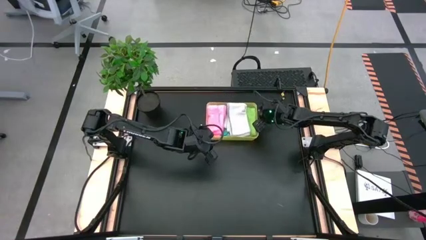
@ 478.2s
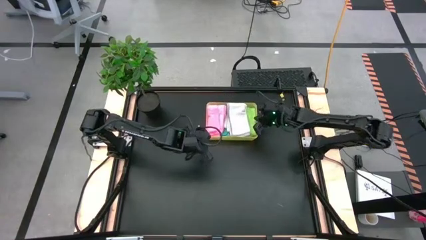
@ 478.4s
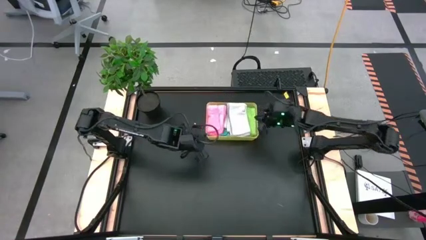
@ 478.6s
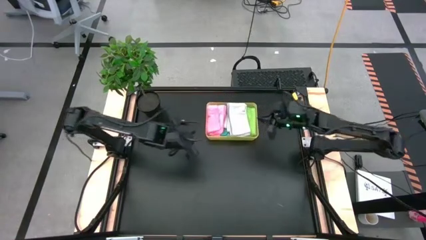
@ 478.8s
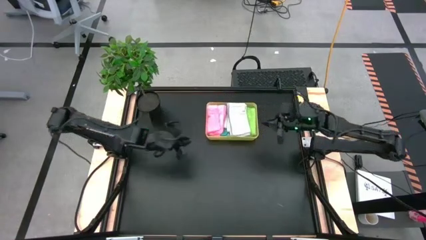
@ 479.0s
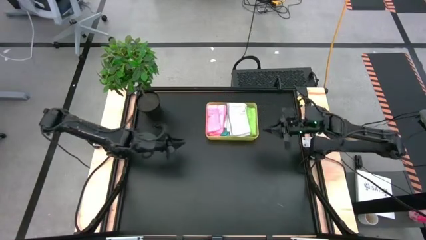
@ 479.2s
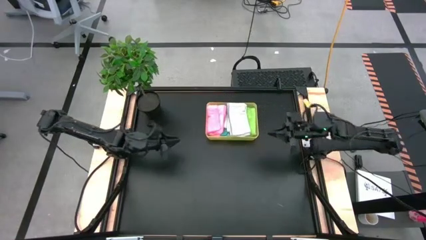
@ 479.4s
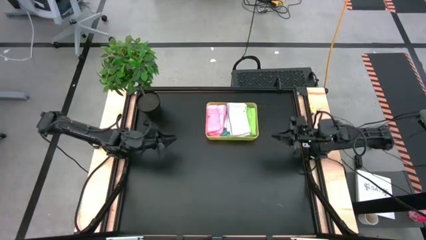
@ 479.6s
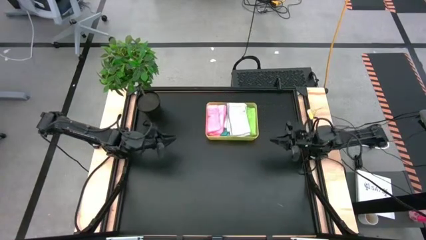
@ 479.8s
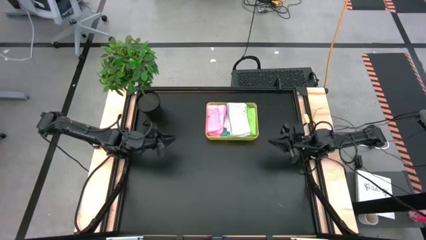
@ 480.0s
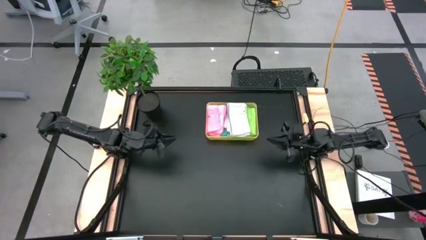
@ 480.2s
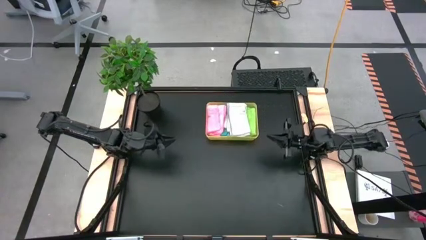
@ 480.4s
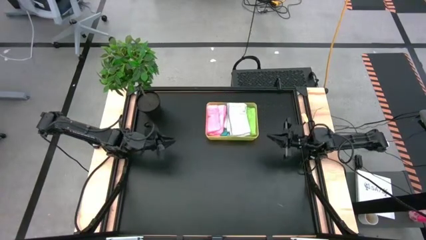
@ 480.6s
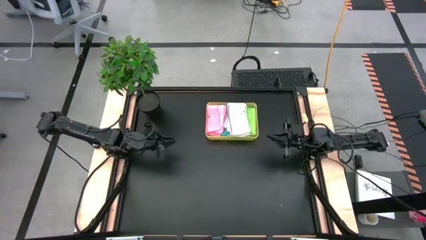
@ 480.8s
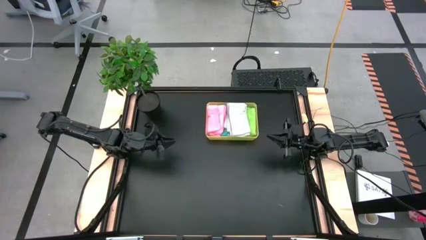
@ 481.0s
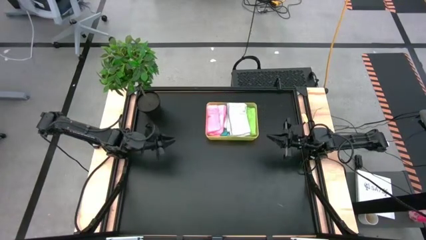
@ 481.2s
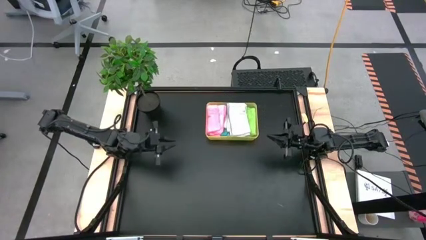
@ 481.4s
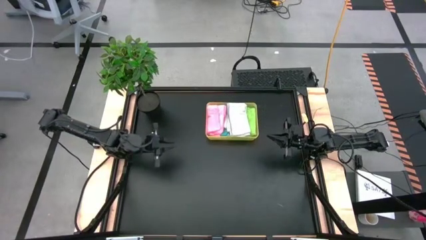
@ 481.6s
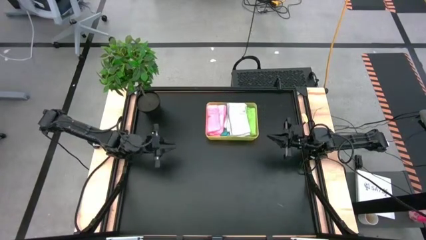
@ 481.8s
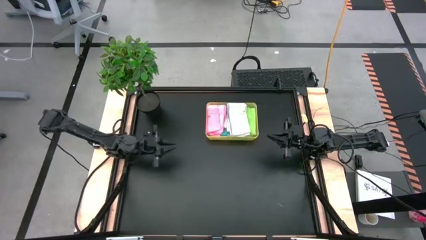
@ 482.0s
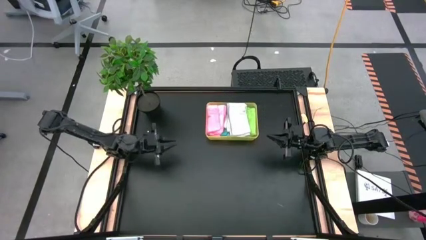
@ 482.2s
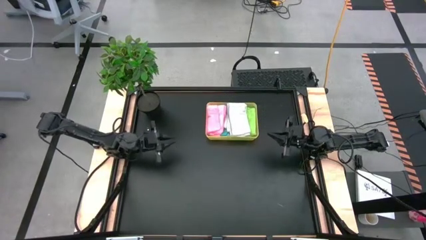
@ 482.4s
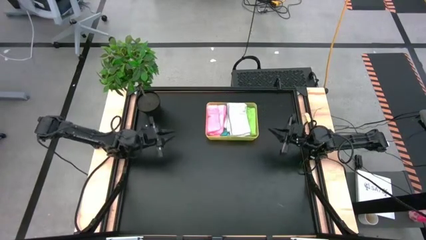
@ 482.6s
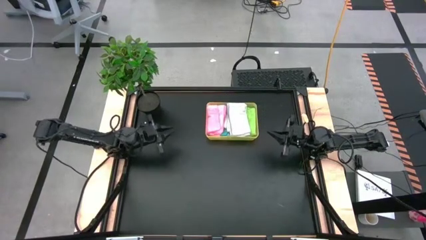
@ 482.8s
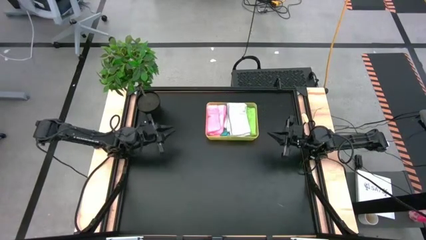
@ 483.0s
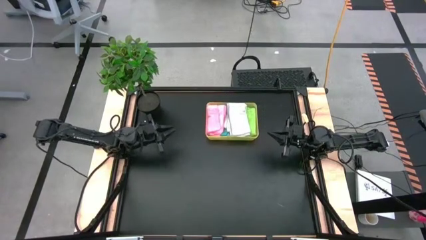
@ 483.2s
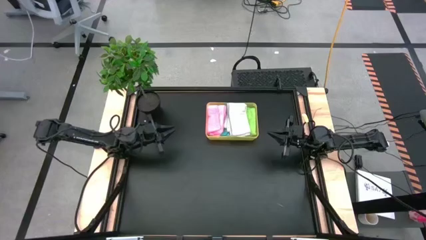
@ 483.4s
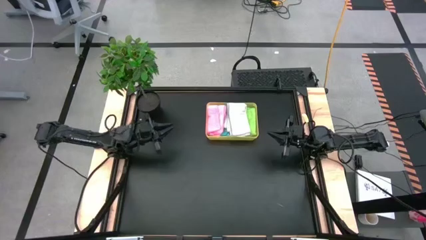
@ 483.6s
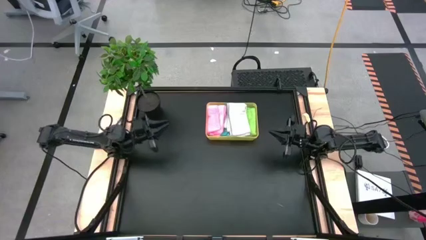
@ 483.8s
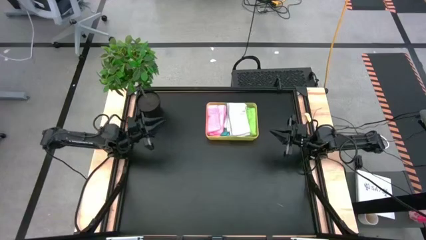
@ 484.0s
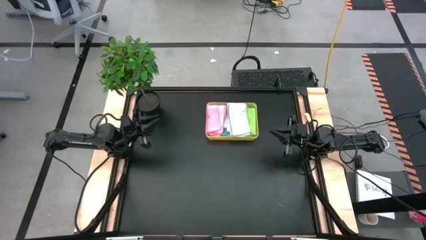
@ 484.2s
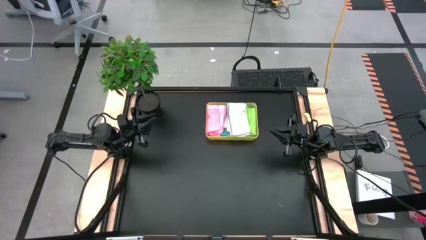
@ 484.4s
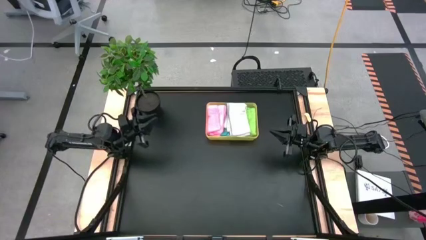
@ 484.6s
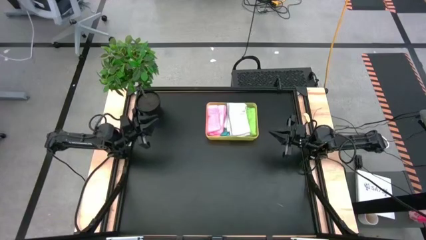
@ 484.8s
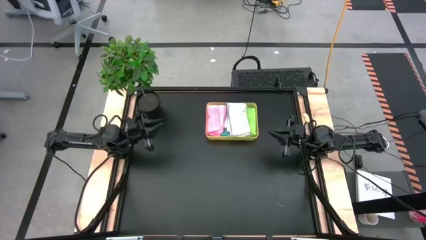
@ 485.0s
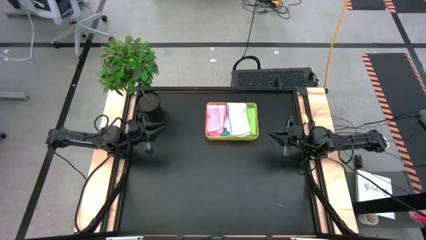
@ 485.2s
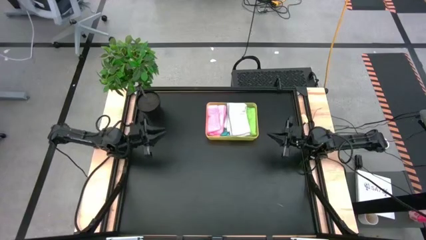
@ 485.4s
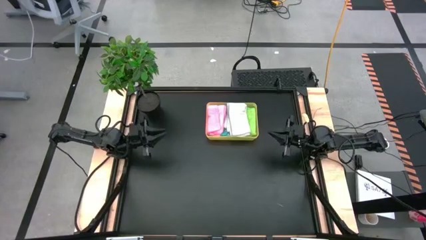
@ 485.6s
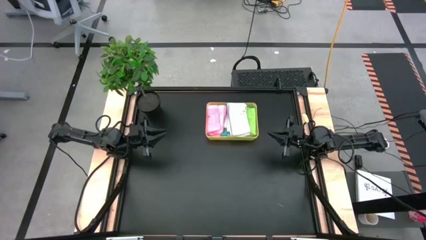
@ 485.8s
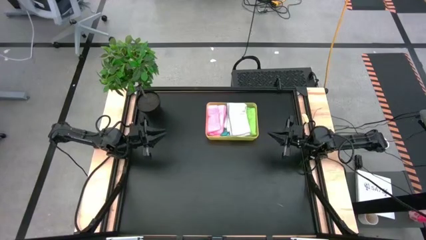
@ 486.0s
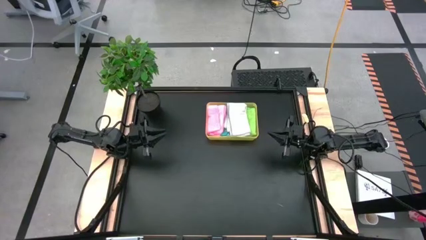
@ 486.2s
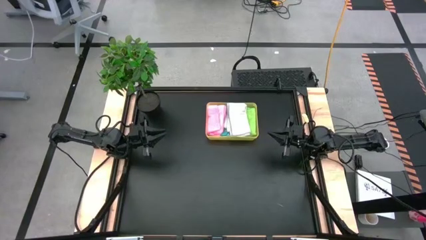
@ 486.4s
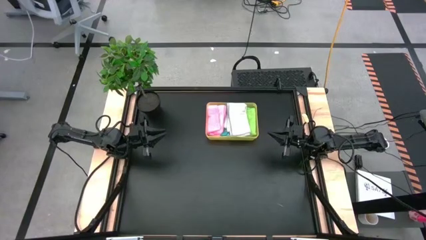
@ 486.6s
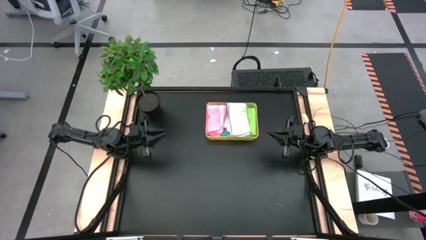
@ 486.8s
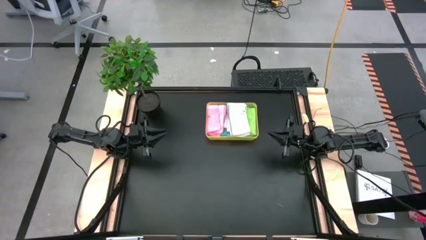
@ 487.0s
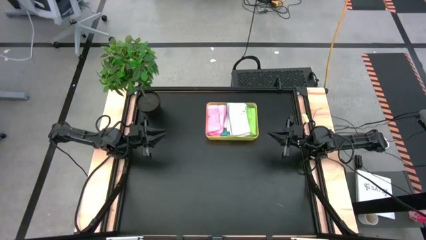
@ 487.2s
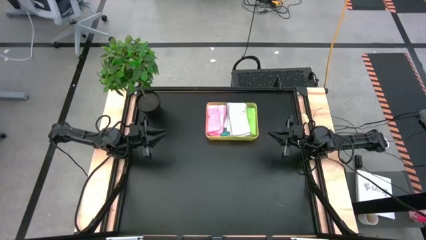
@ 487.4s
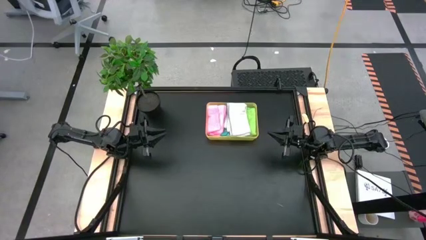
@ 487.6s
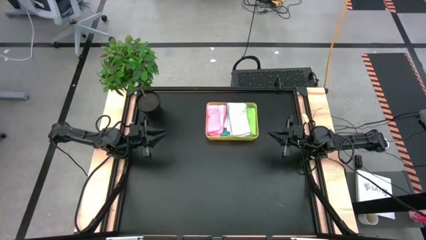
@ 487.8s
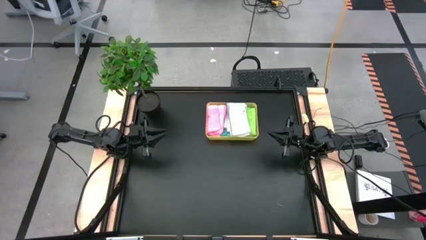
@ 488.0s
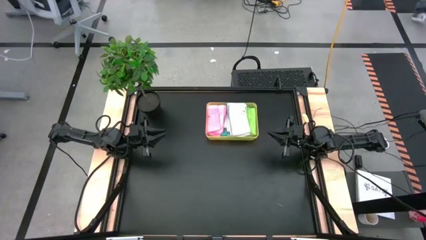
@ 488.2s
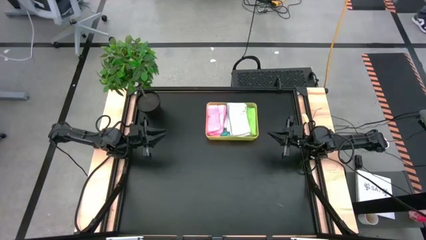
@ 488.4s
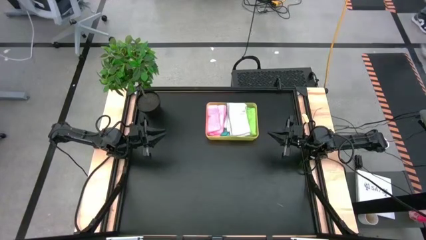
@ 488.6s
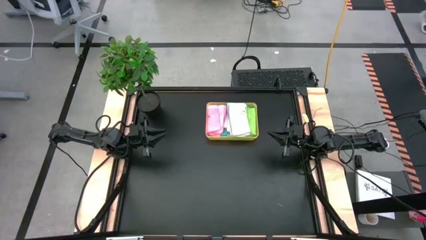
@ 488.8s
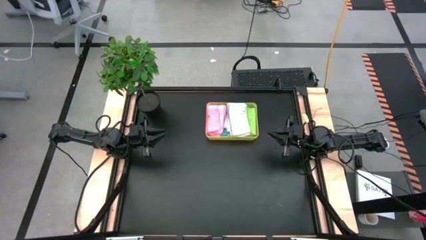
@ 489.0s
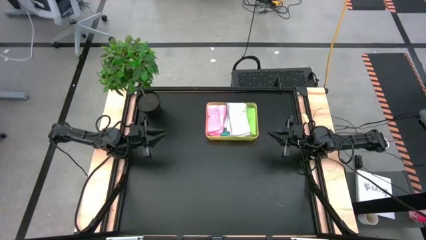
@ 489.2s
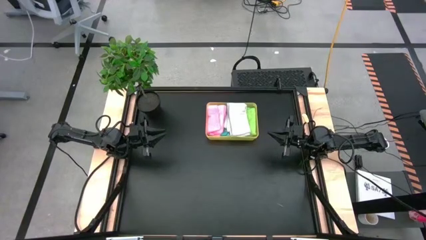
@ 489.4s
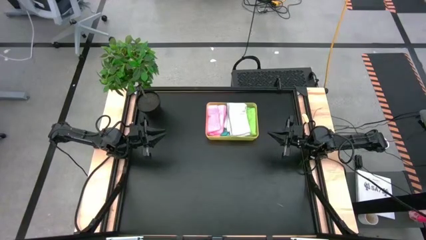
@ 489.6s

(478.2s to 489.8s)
Task: Fold microfiber towels
Return to Home position

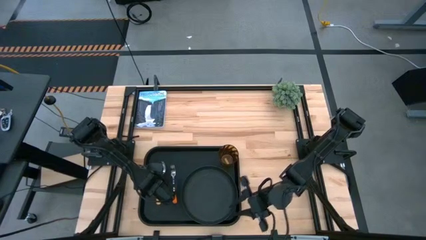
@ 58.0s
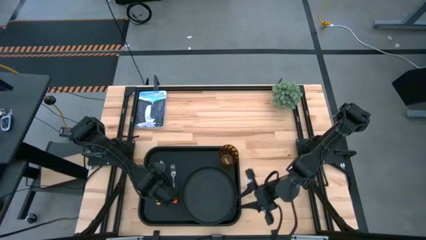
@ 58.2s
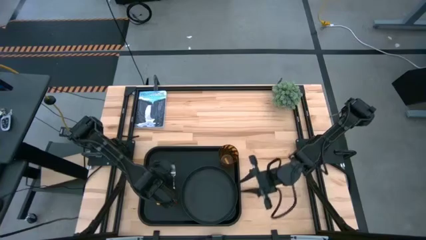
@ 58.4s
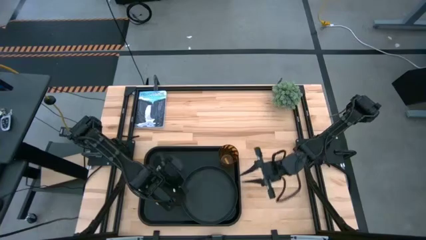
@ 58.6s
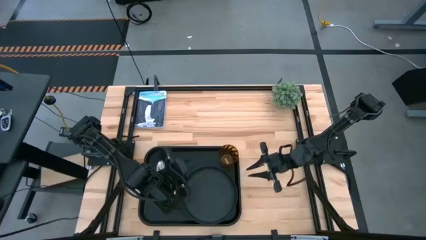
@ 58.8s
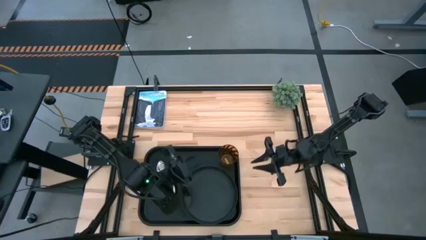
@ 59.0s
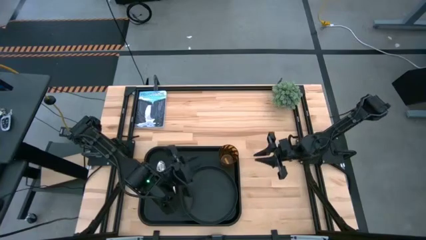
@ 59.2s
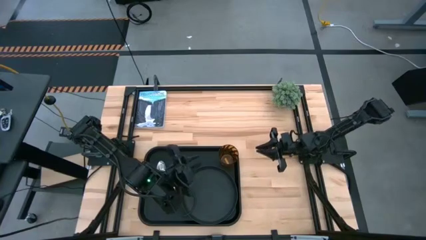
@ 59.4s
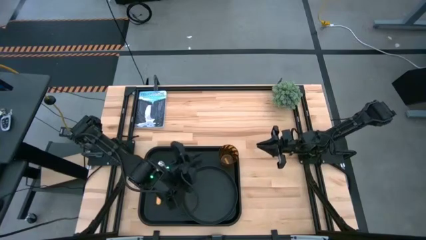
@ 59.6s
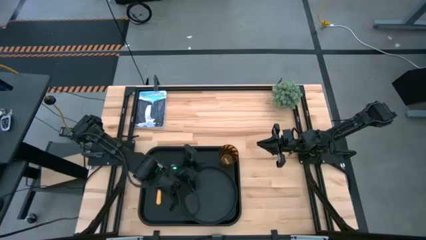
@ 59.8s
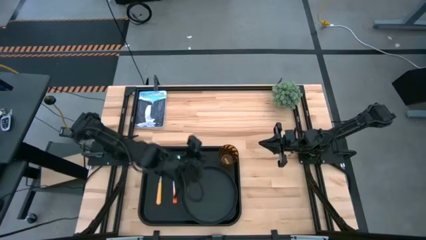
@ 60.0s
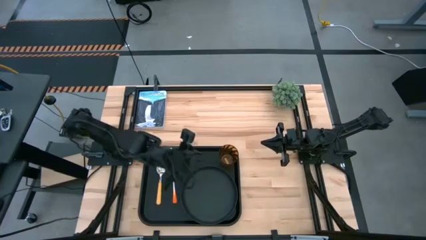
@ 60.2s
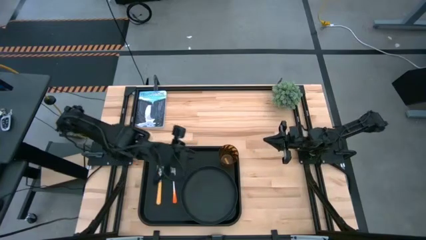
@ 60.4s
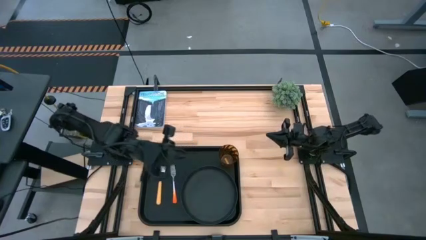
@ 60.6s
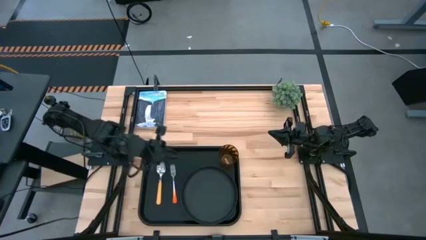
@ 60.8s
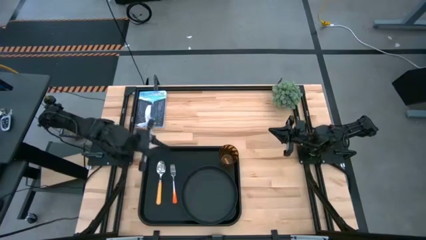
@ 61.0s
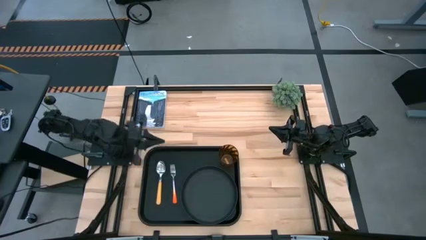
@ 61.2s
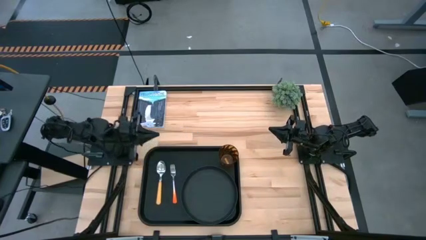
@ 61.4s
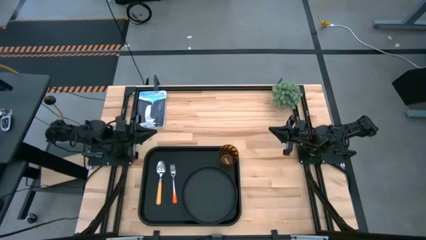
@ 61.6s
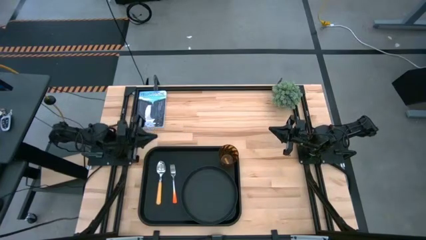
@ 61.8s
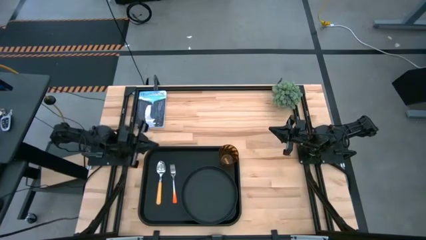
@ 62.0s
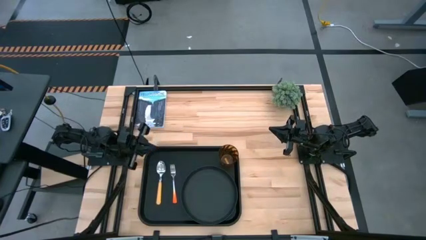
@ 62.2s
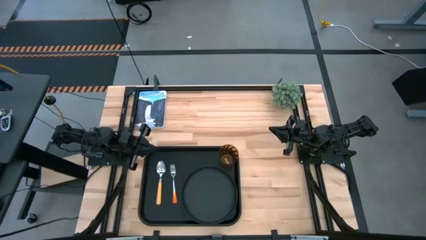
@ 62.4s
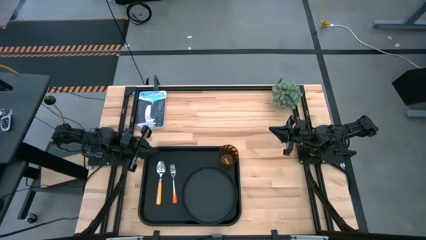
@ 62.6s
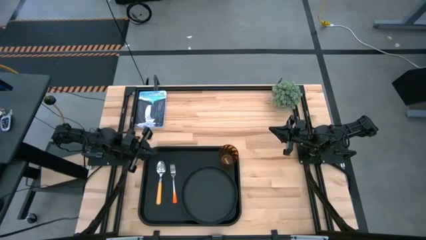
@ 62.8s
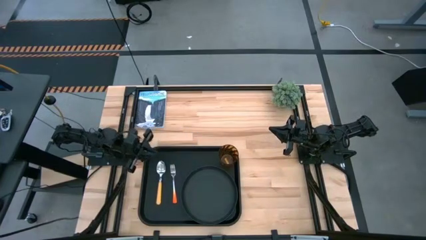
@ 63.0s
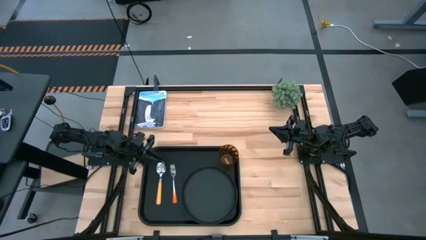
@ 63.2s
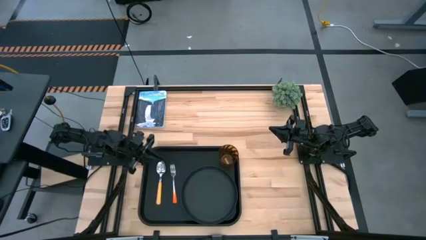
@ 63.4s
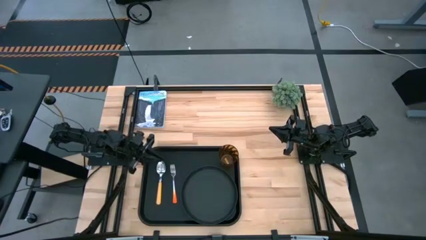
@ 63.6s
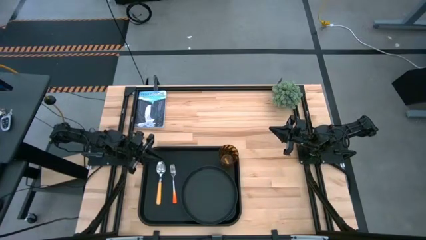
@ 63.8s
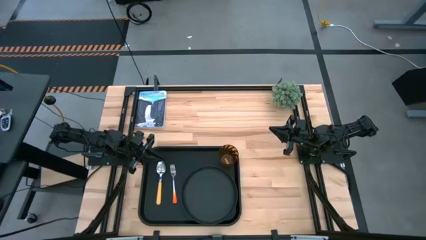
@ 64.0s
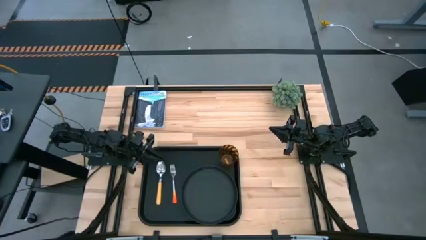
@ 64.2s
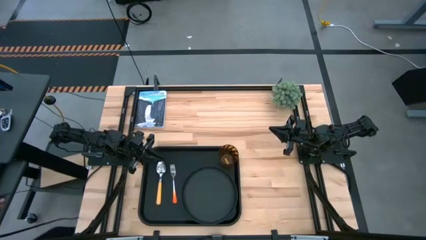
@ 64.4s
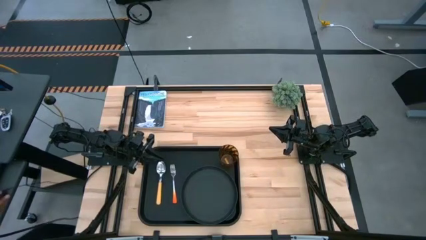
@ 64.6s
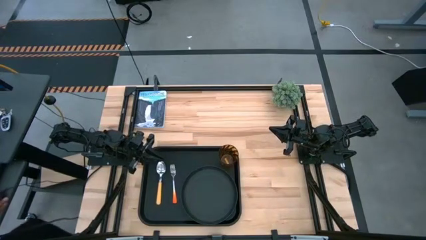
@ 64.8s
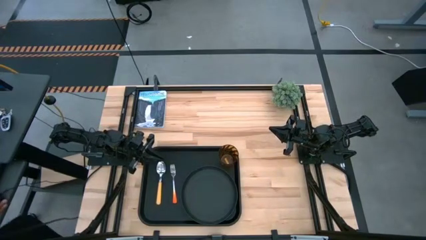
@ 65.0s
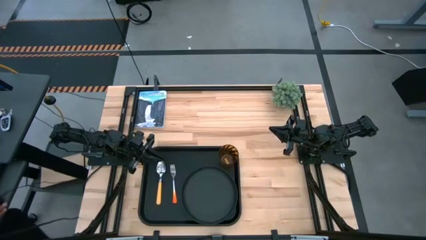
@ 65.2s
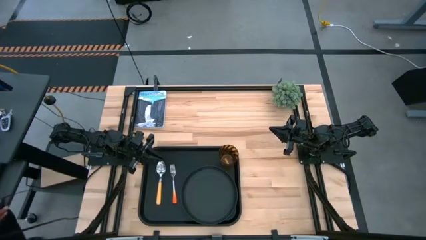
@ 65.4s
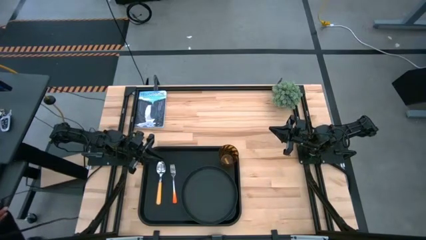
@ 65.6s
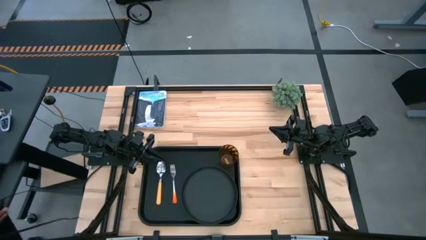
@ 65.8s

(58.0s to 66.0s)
Task: Pick and place plate/cup/fork/spoon on tray
Return to Home Position
